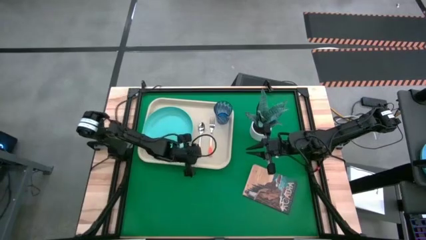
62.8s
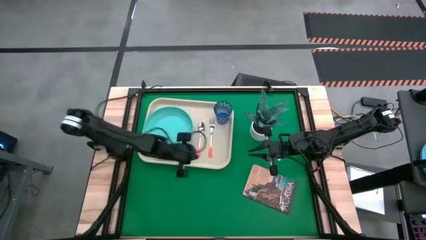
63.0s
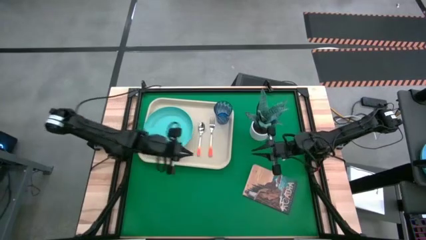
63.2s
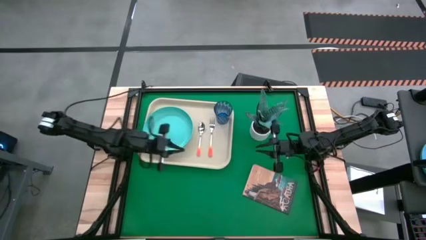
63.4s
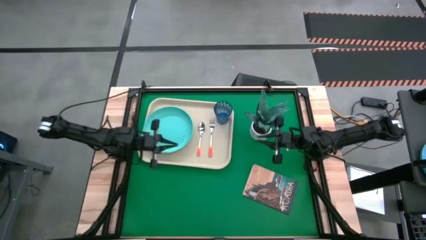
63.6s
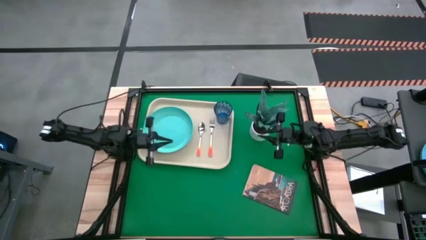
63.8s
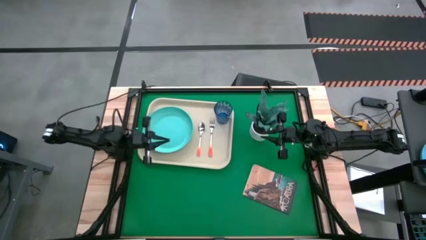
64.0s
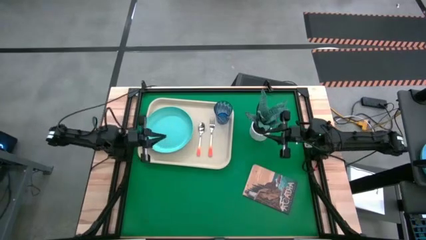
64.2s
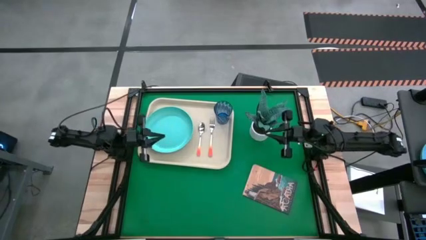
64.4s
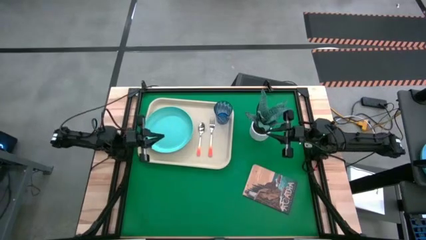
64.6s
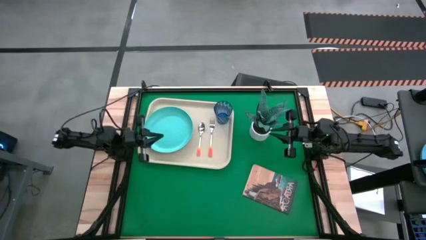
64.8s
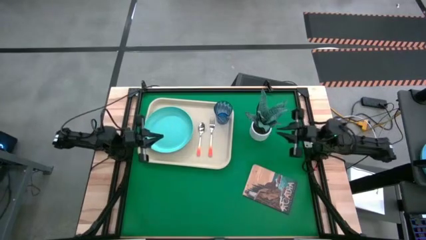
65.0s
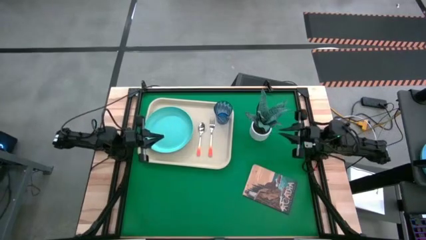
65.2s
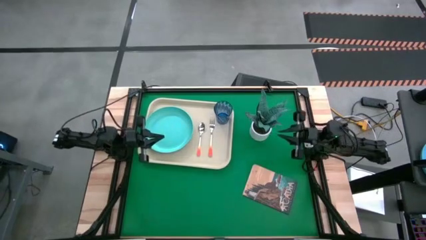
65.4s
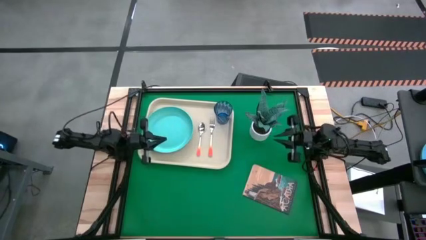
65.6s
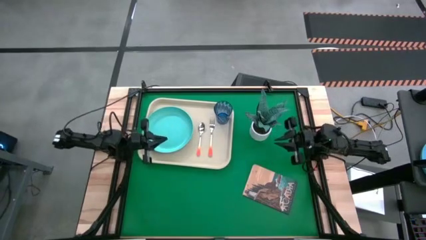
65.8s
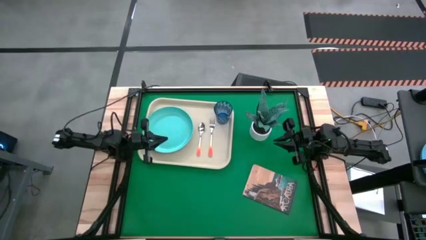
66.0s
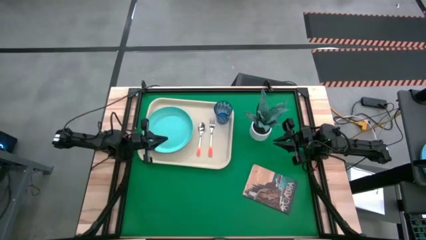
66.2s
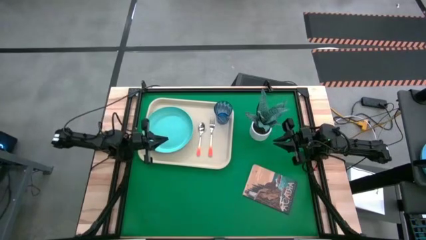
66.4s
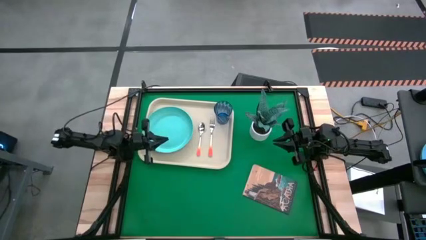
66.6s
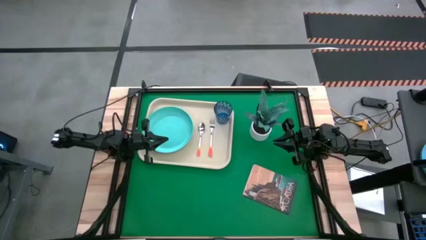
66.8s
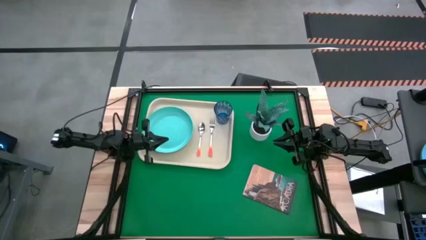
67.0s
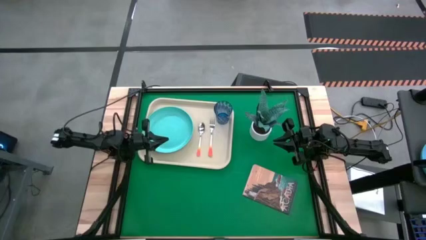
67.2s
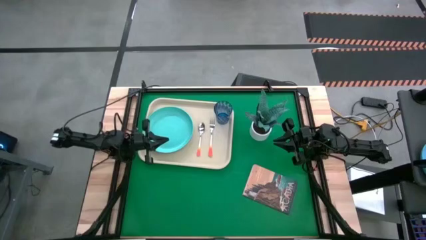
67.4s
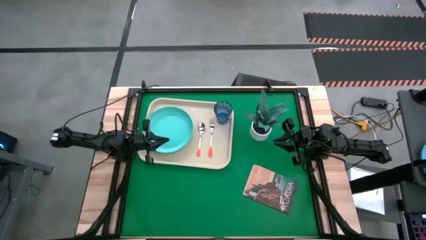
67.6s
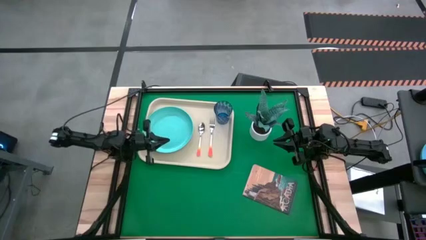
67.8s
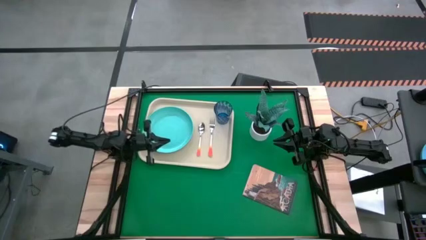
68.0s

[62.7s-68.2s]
Task: Pick and place plate/cup/fork/spoon on tray
Return to Home Position

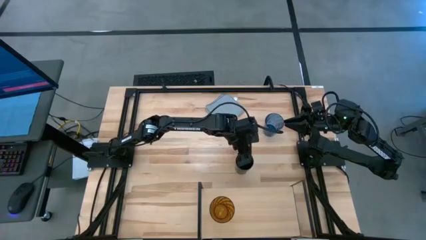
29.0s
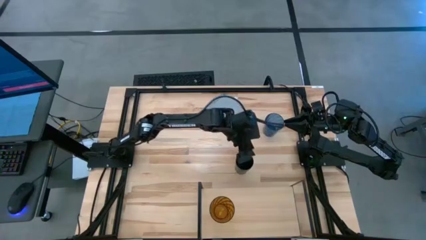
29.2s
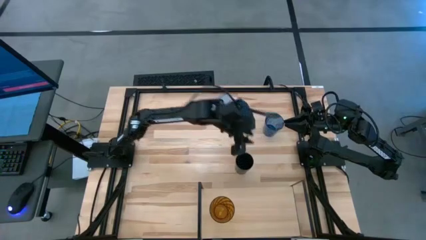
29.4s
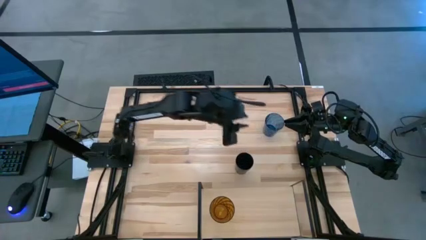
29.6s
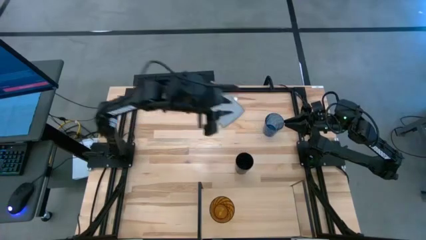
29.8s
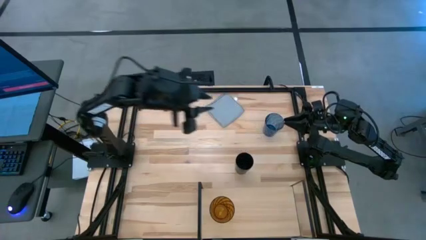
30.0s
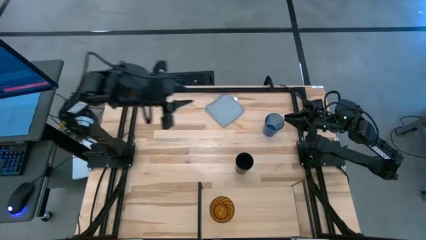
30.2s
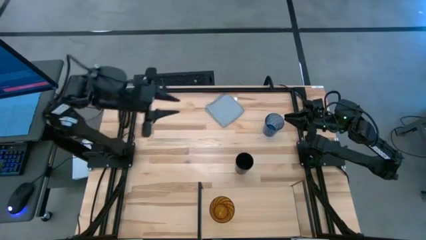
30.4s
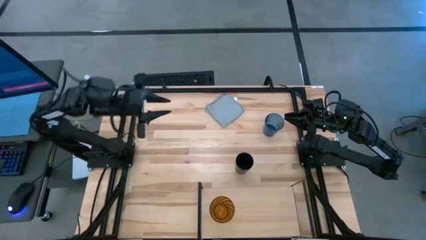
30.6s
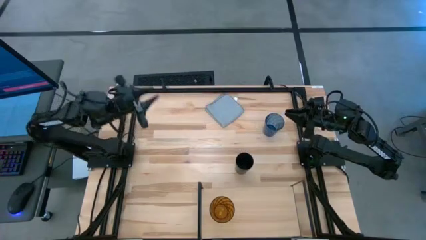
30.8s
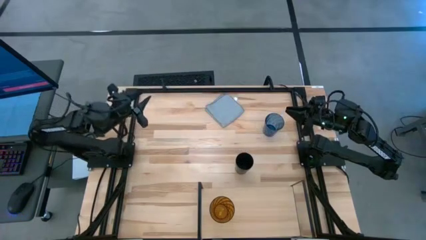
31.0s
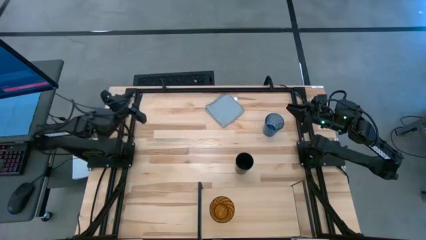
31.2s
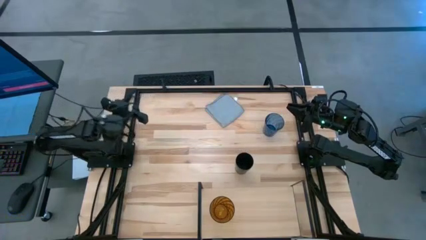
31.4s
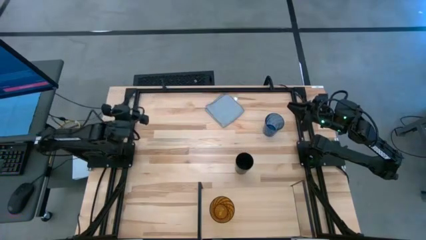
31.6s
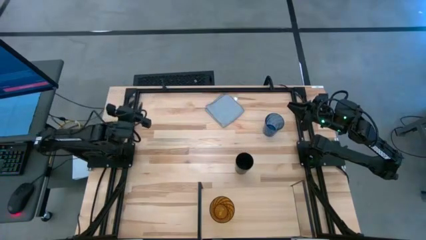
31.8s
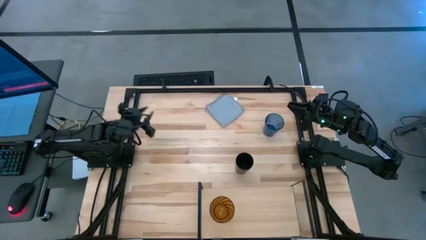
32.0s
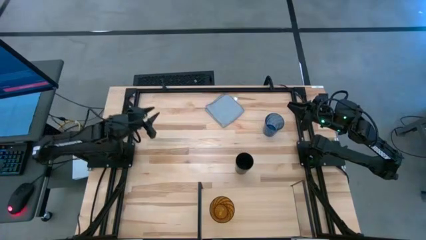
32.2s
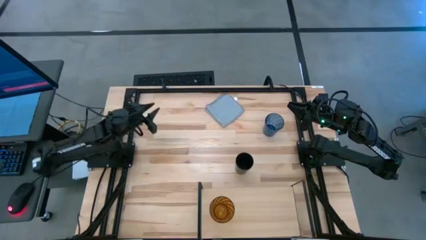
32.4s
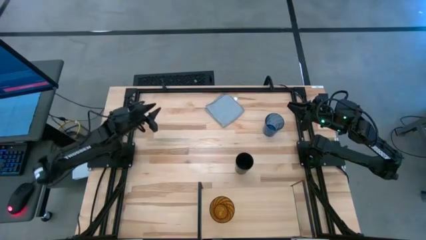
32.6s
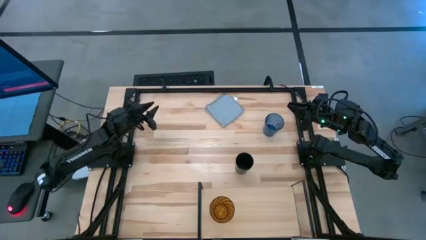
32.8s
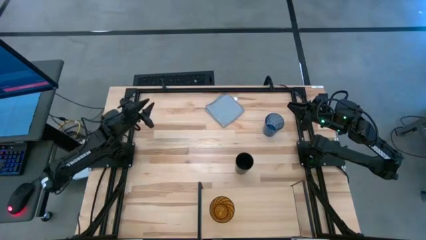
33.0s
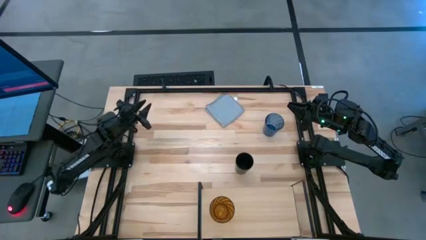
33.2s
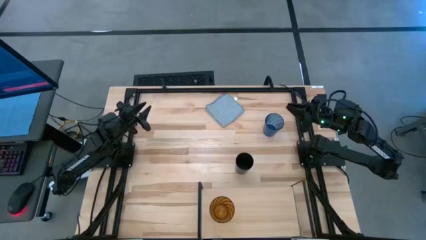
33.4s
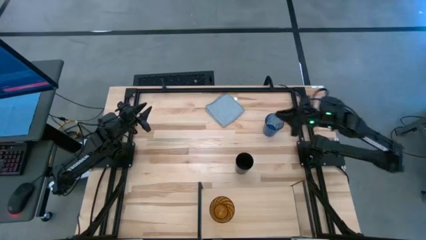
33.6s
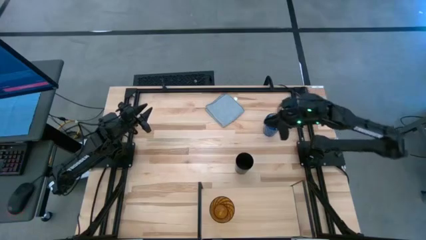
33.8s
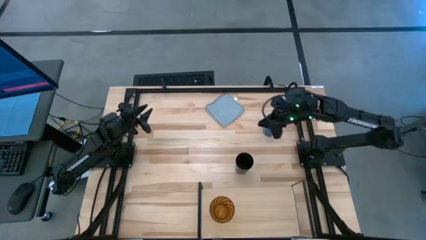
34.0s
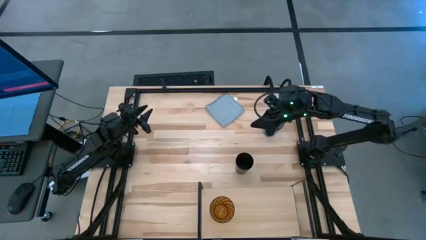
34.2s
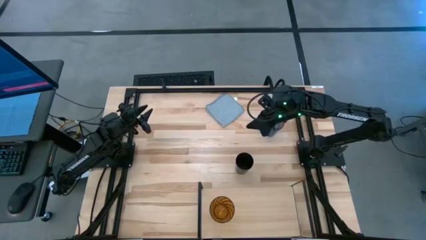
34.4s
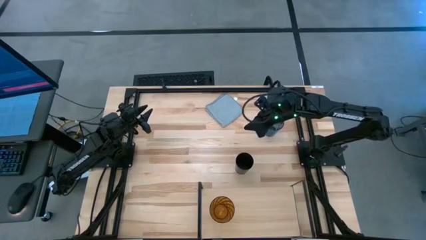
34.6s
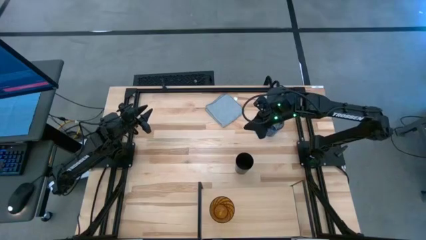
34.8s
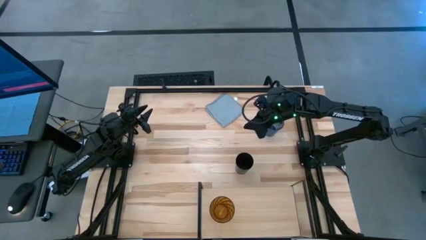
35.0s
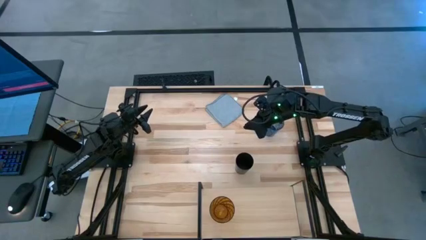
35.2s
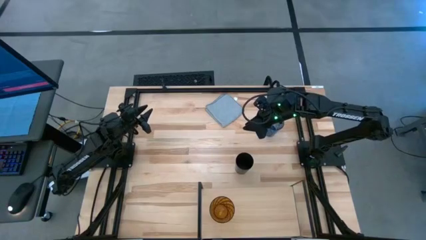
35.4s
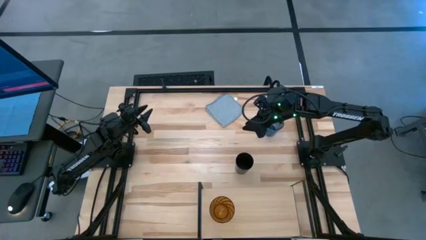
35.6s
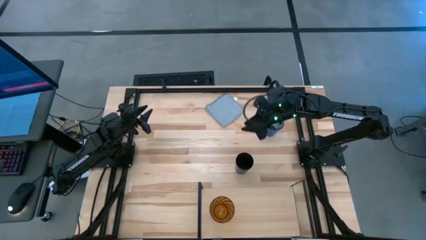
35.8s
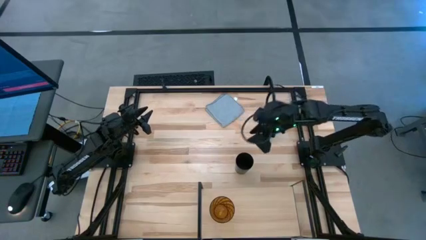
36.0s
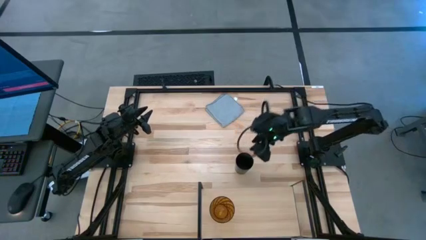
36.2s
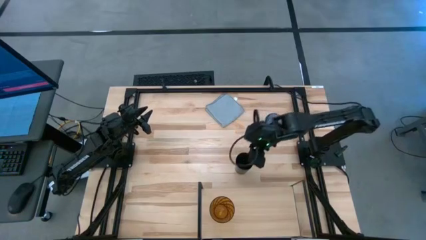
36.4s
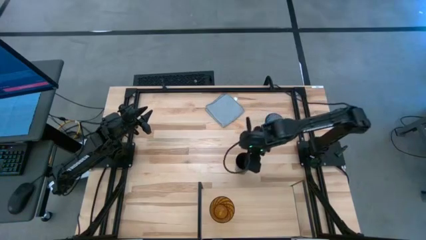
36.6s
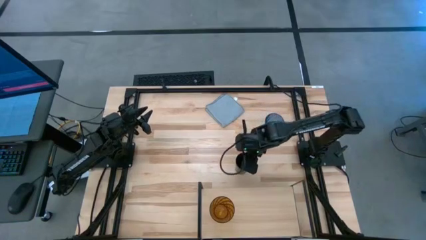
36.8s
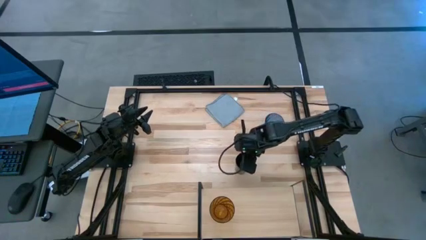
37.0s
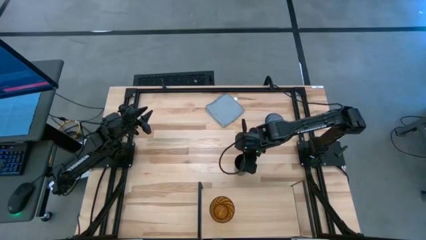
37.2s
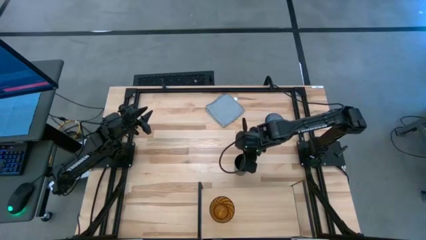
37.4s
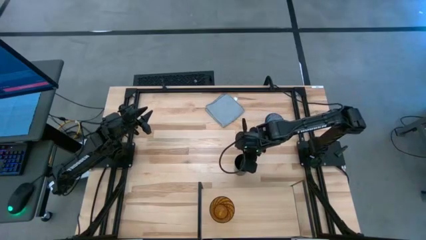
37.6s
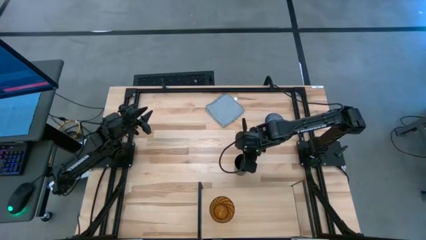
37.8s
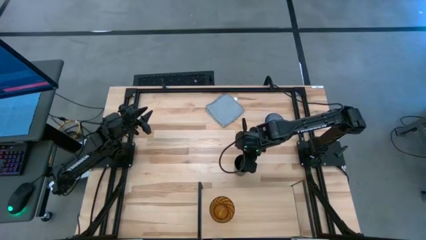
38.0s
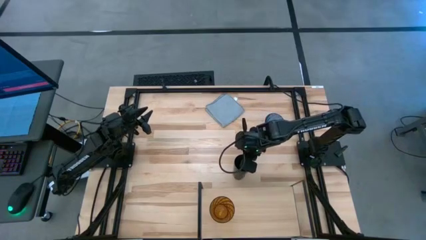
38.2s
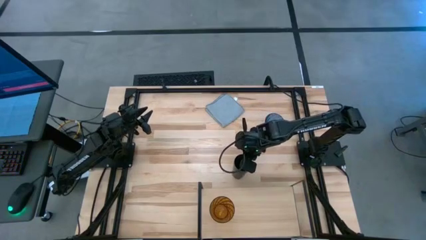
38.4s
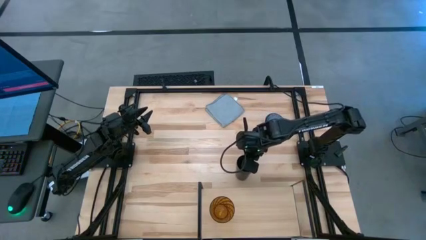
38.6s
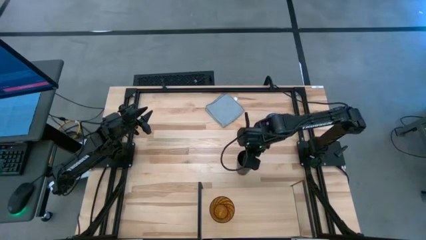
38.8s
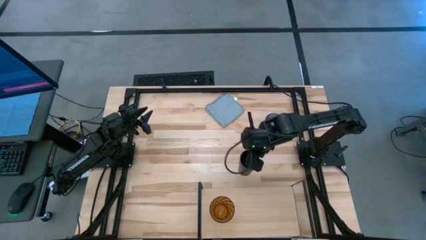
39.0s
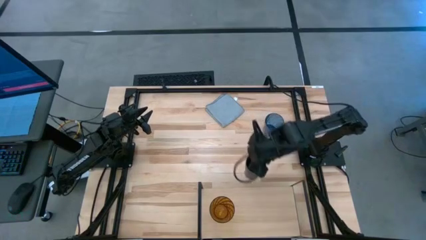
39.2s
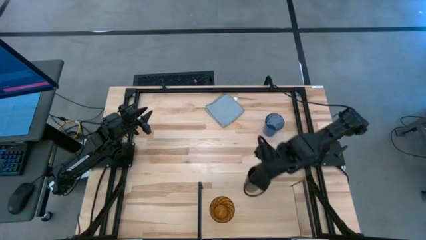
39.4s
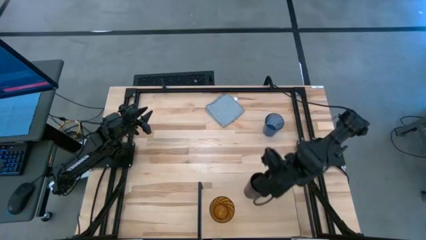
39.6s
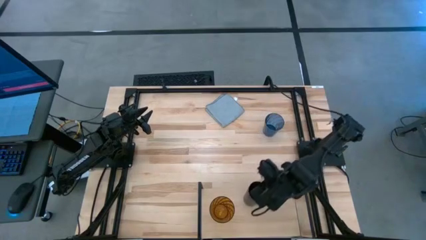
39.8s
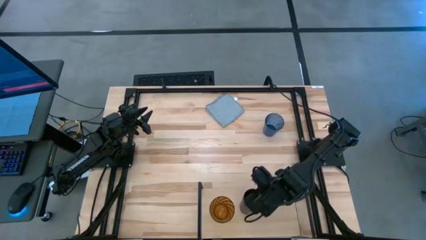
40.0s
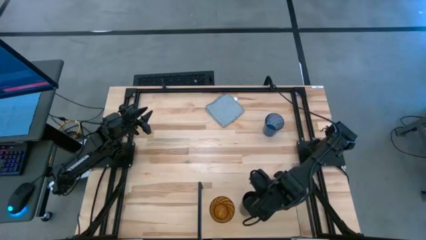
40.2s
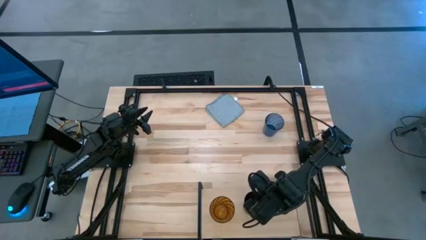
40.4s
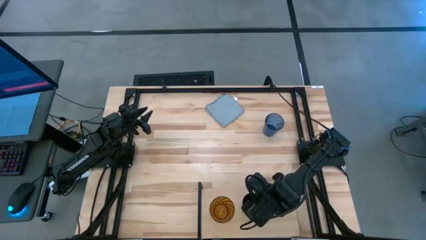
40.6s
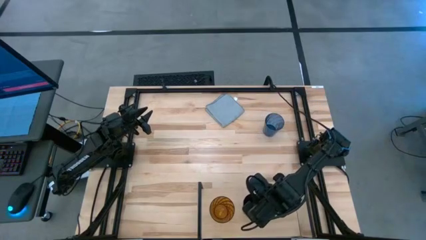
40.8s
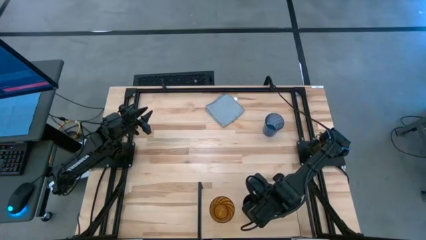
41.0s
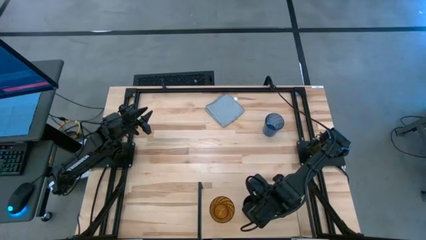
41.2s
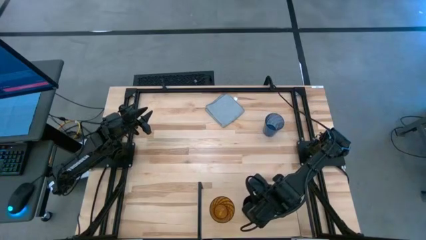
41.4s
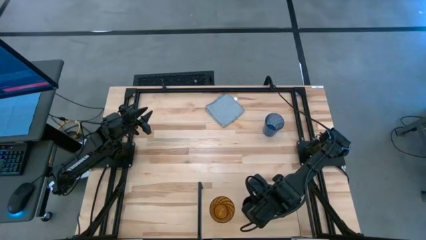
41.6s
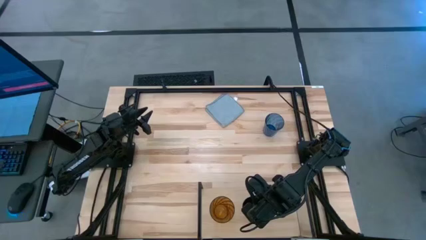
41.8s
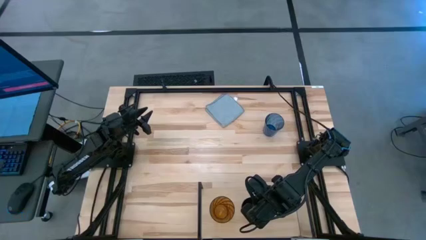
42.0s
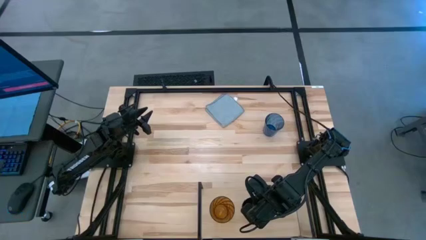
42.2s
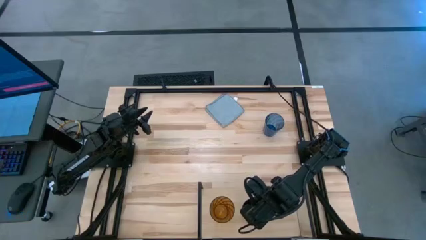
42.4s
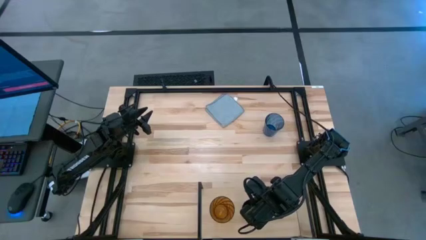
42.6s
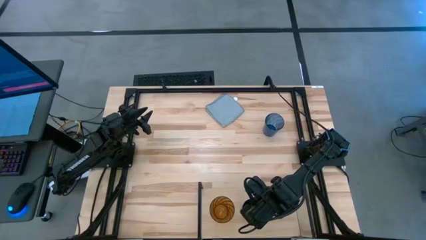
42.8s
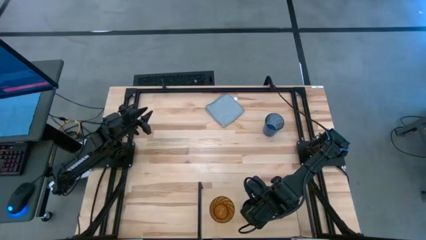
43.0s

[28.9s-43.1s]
Task: Stack small to large cups/mugs on shelf
Put the black cup on the shelf
